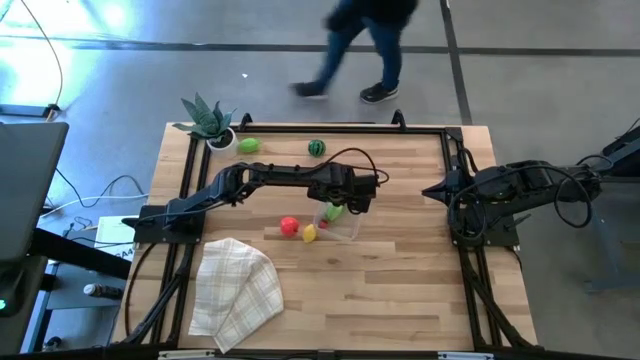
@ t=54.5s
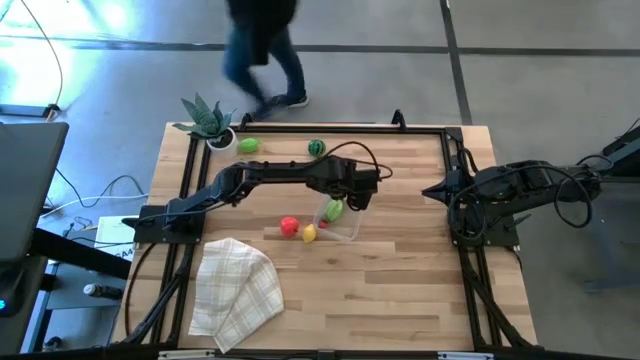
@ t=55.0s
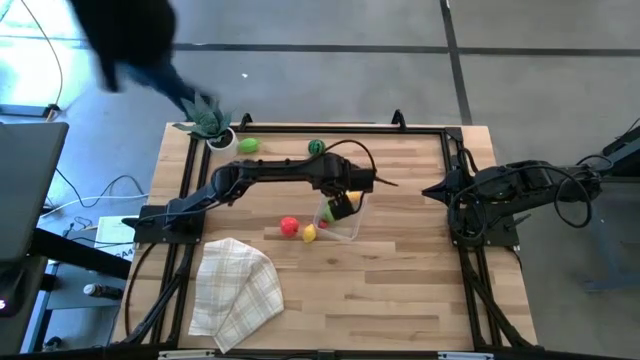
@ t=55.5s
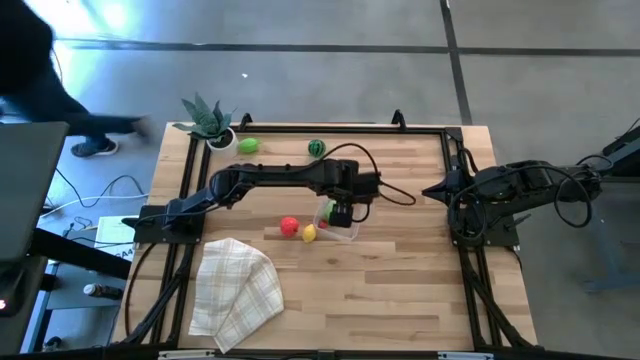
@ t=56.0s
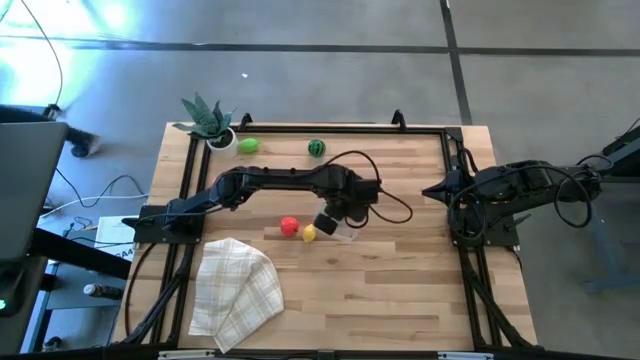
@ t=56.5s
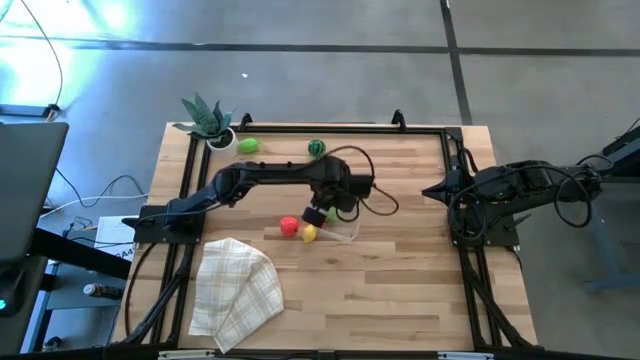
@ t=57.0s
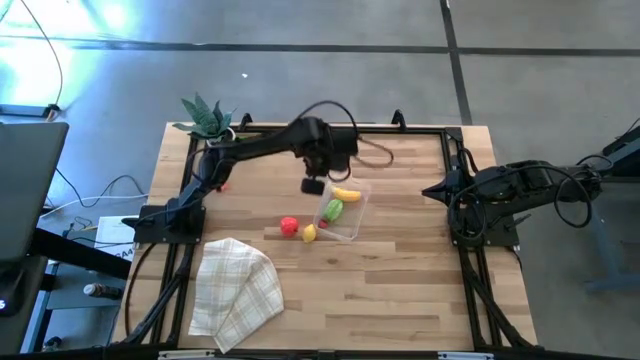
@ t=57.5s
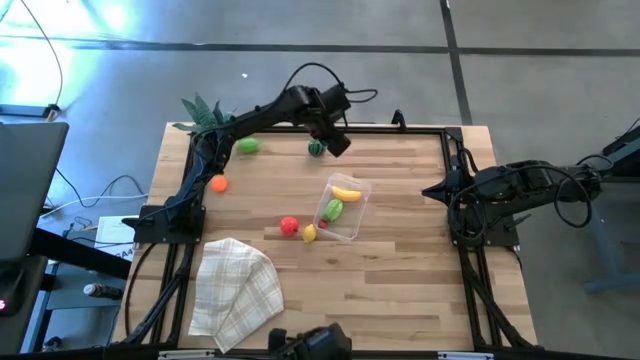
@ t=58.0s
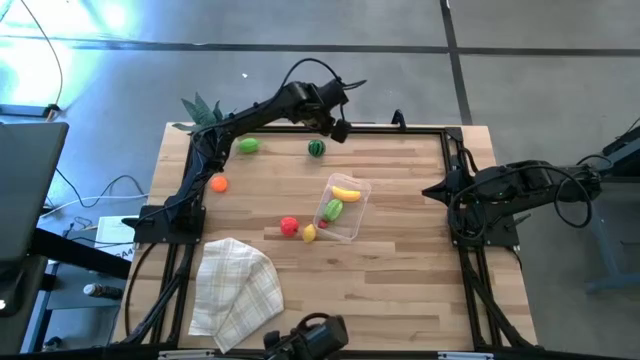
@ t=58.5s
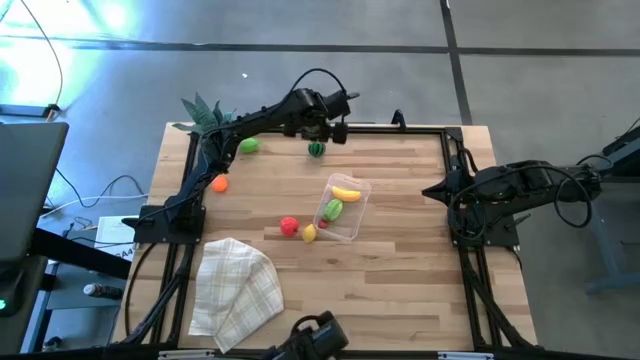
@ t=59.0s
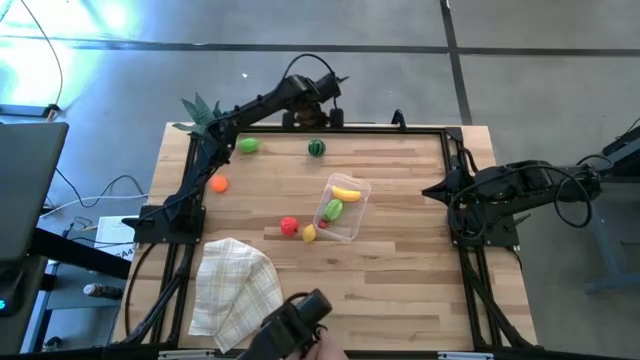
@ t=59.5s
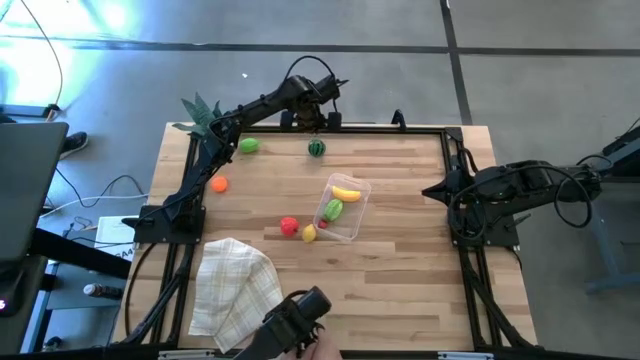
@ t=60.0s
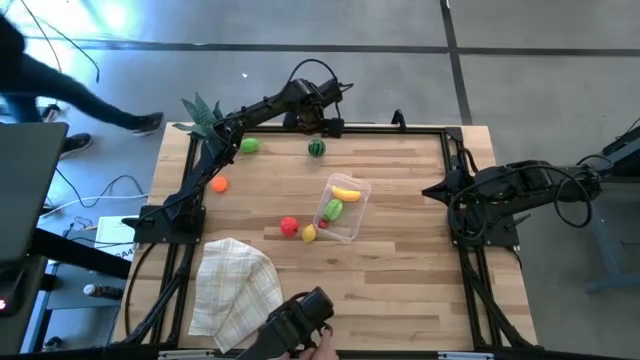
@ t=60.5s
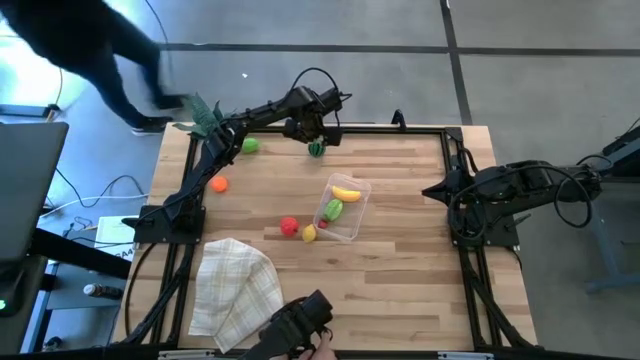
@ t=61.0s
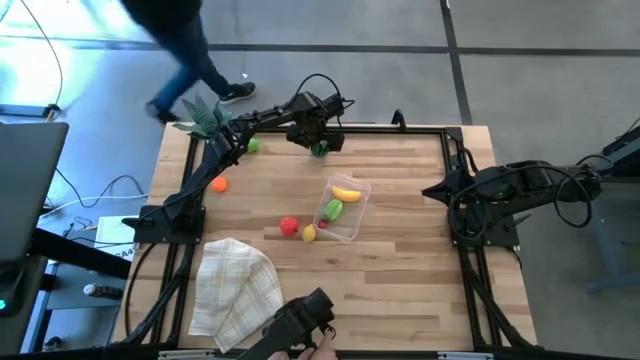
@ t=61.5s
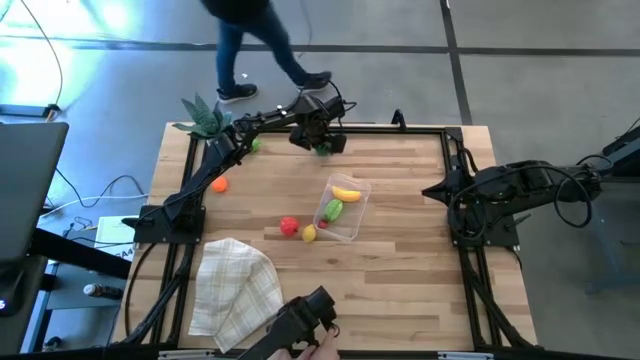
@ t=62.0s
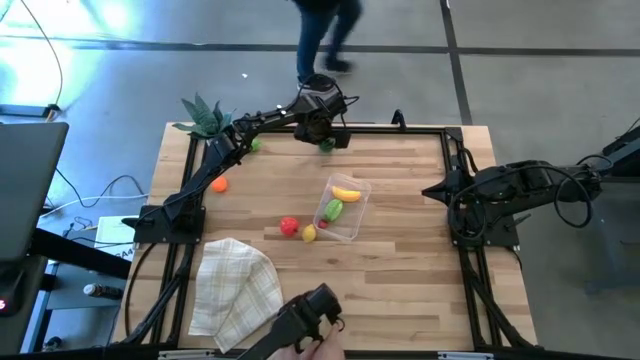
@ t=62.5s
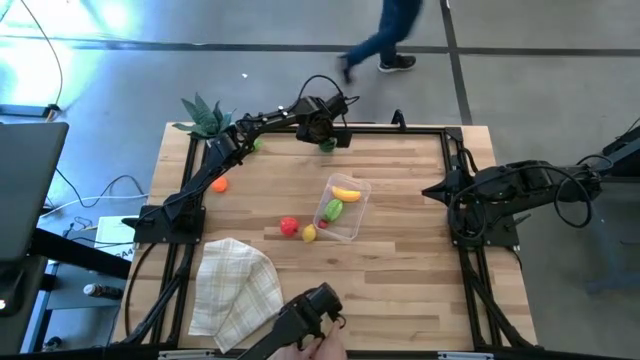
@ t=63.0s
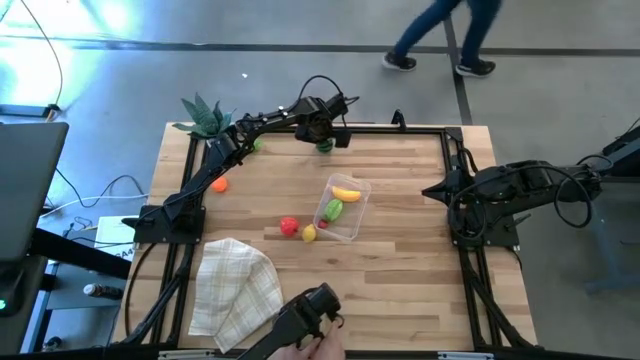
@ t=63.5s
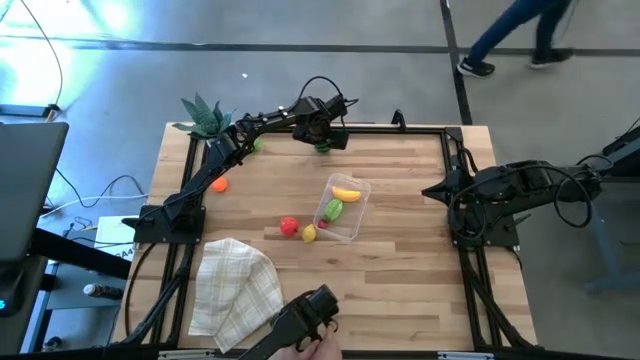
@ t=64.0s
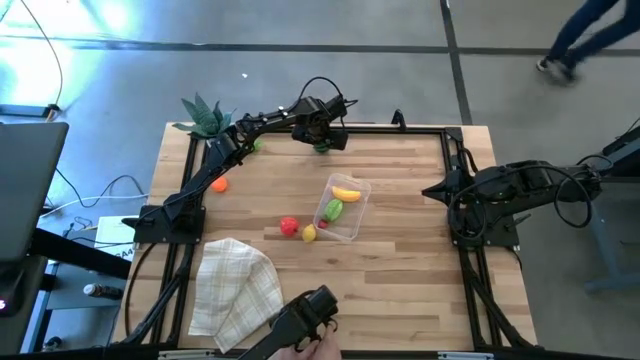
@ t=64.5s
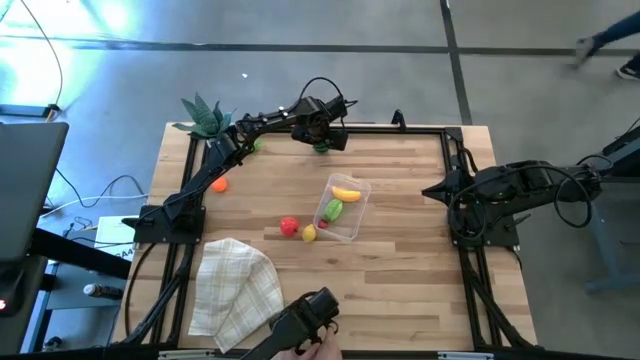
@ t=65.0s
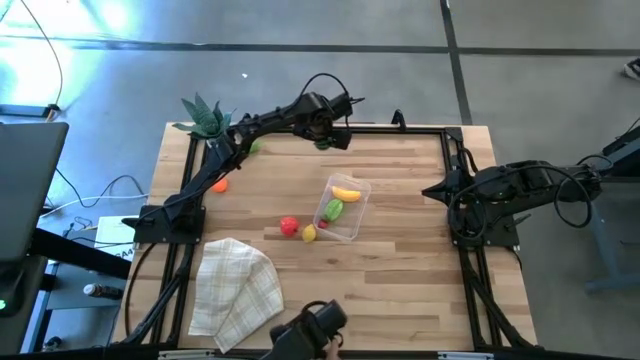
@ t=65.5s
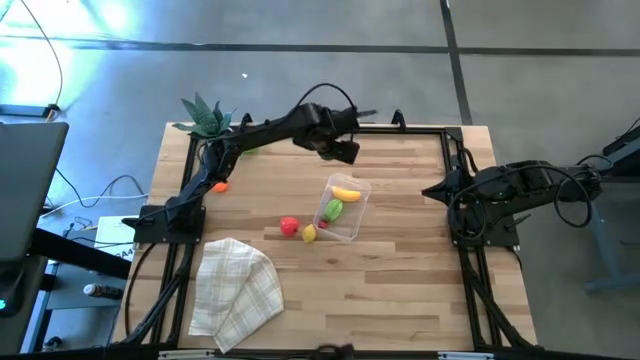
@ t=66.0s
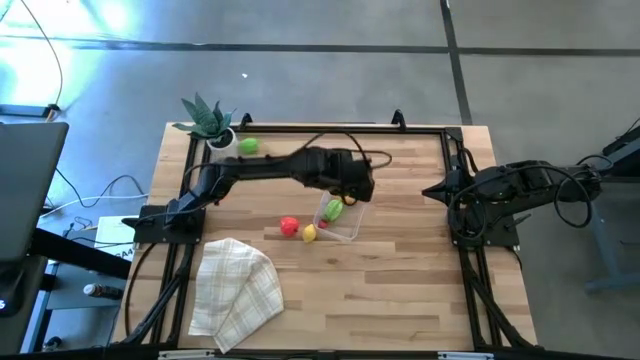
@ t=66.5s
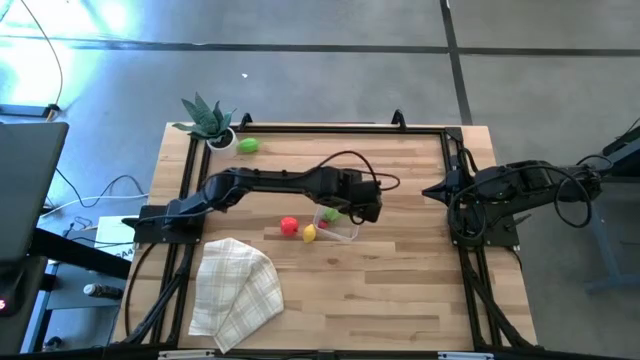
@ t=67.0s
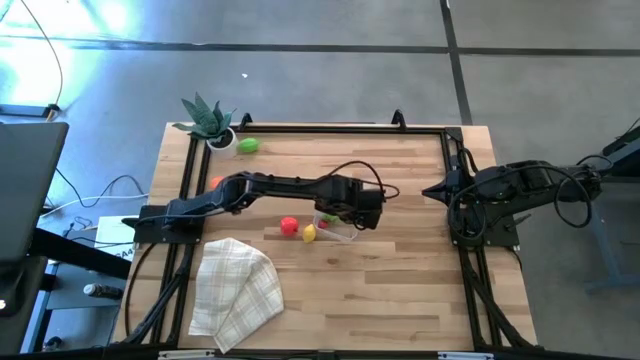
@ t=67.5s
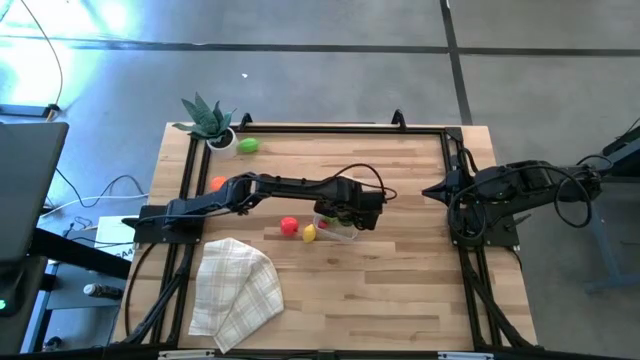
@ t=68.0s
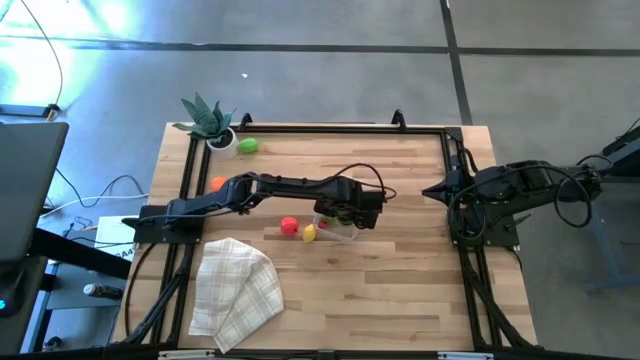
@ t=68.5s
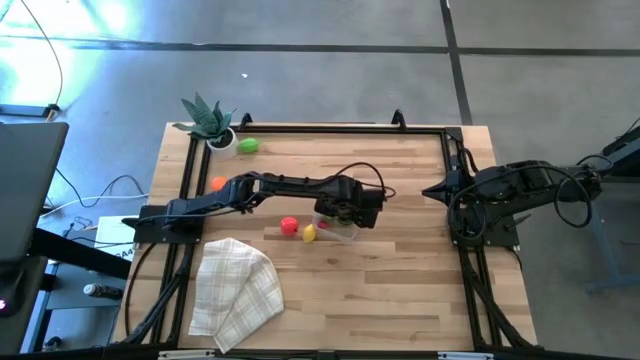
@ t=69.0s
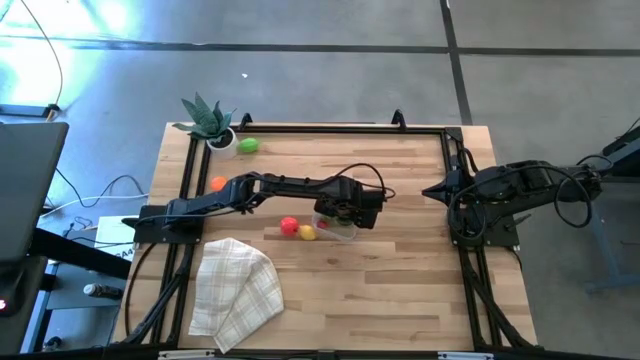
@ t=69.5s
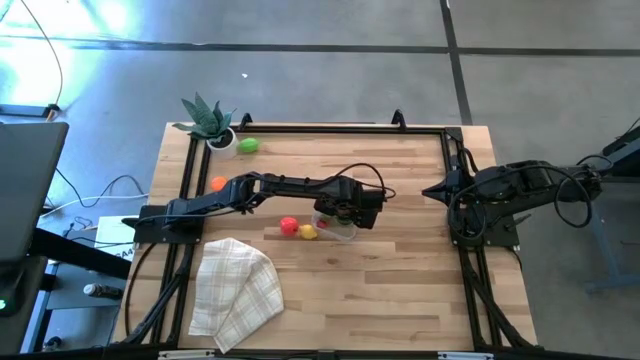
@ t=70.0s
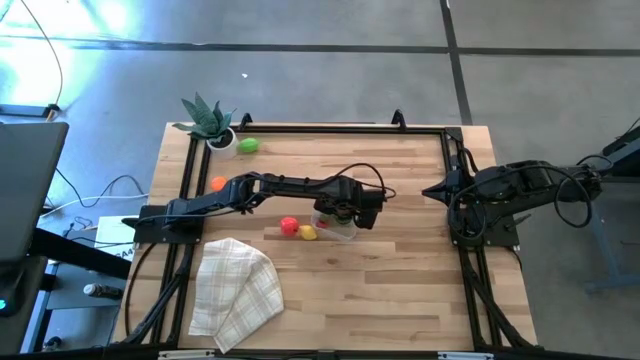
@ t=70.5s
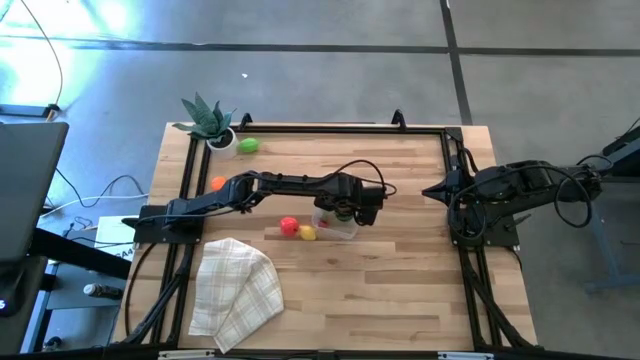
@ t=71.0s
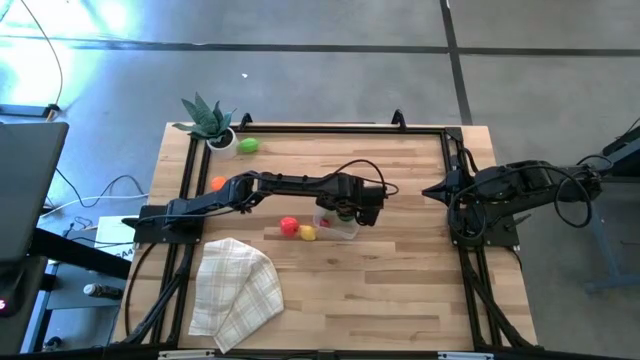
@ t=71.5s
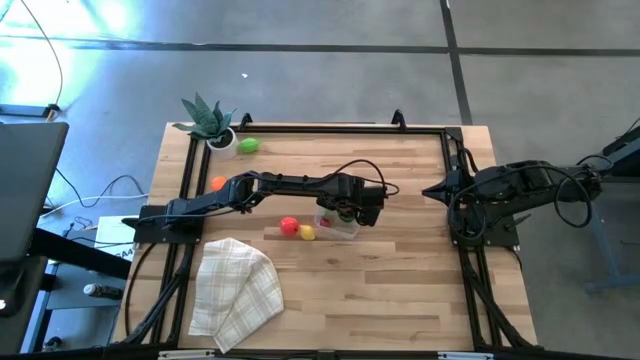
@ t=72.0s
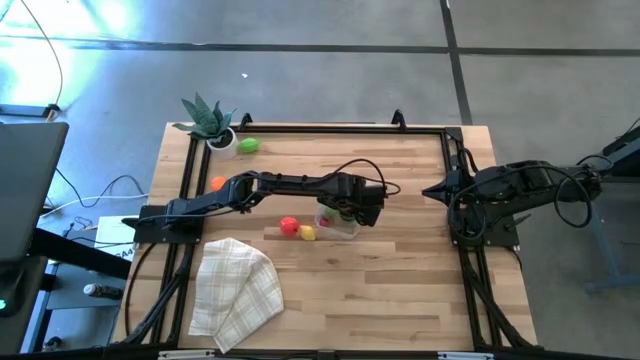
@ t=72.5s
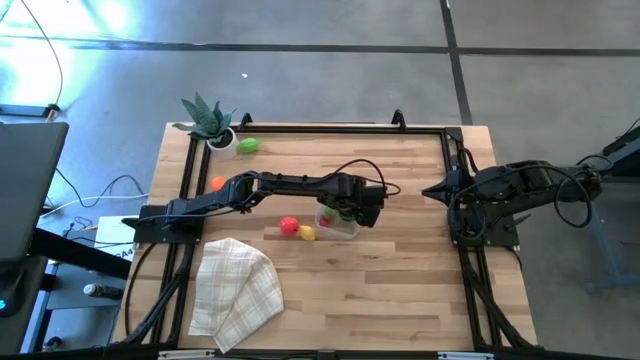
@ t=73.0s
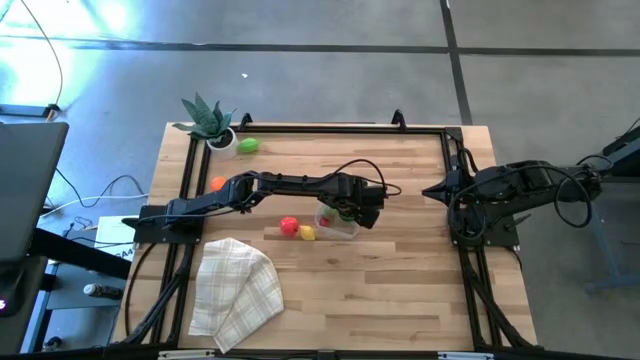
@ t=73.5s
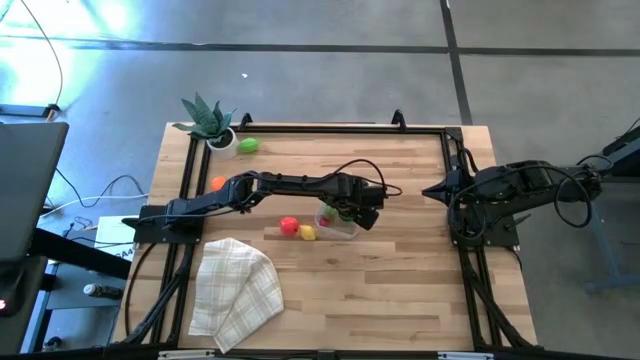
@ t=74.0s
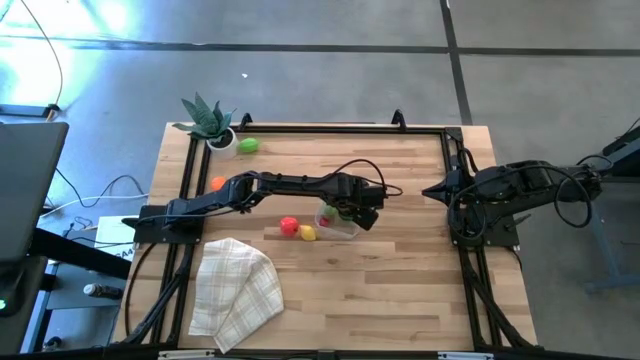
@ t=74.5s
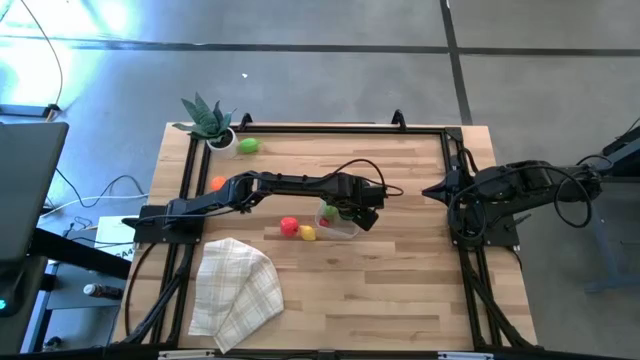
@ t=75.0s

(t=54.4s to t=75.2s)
Task: Pick and placing Produce into tupperware
Put the watermelon into the transparent bin
